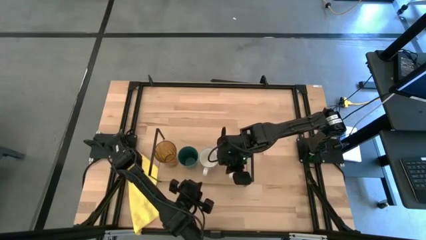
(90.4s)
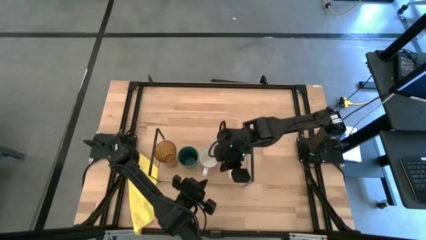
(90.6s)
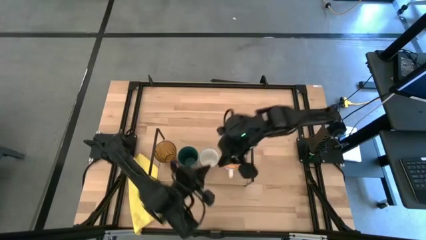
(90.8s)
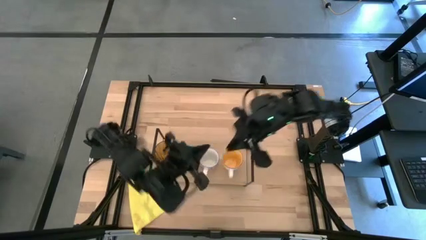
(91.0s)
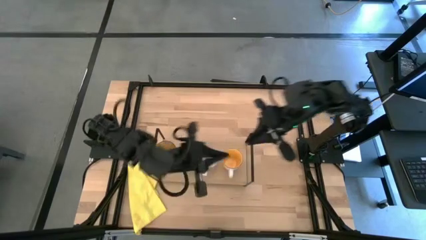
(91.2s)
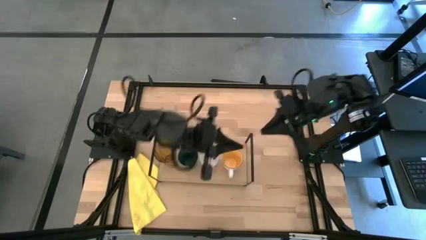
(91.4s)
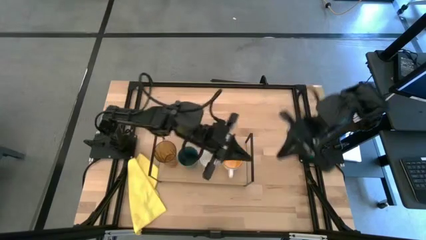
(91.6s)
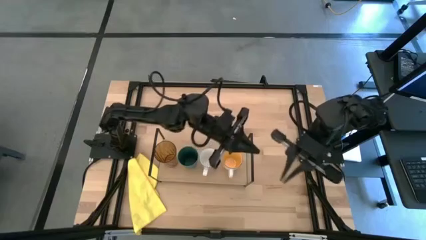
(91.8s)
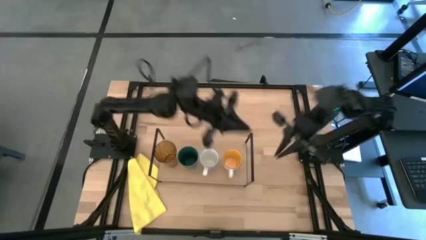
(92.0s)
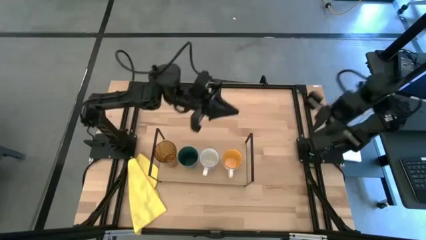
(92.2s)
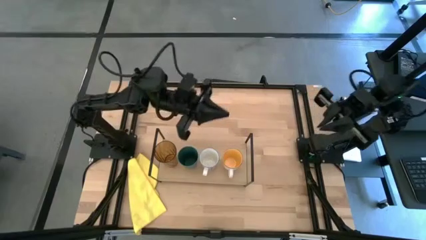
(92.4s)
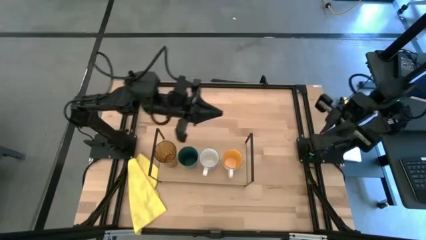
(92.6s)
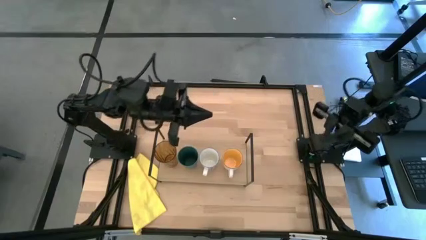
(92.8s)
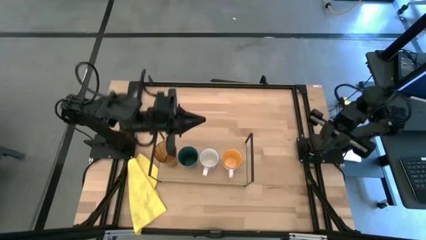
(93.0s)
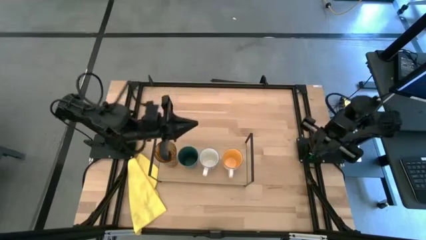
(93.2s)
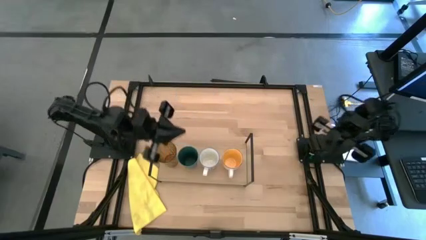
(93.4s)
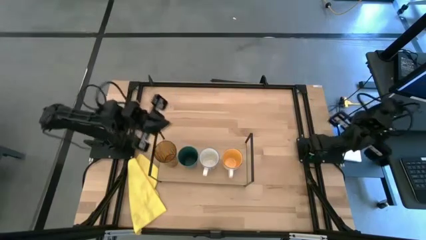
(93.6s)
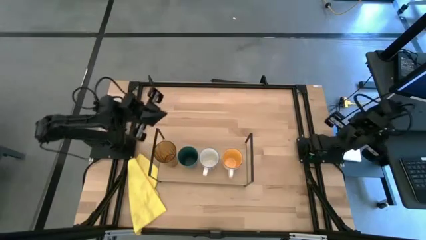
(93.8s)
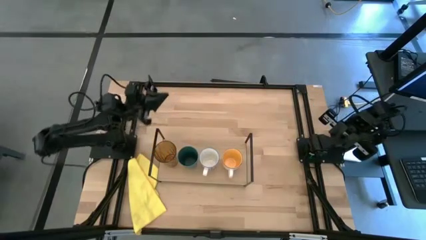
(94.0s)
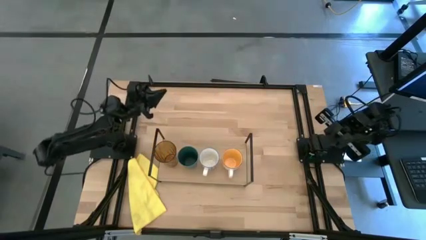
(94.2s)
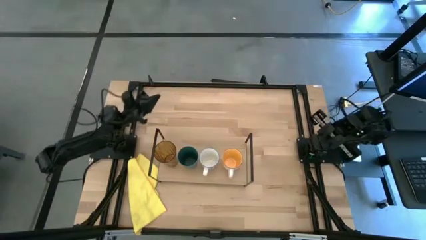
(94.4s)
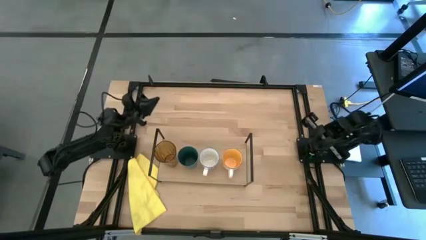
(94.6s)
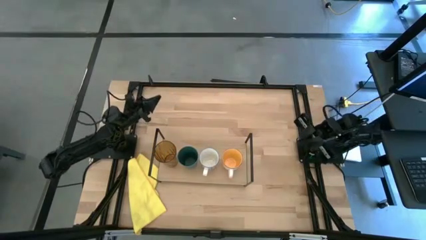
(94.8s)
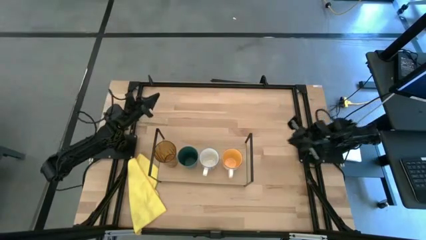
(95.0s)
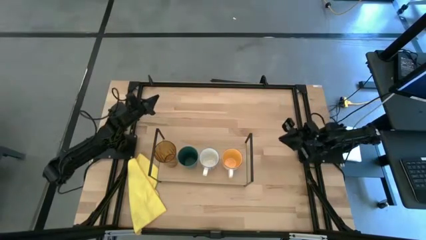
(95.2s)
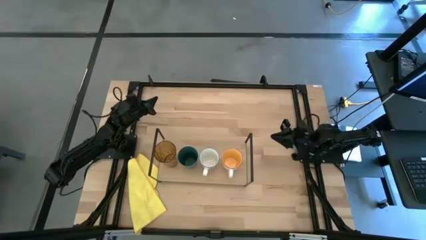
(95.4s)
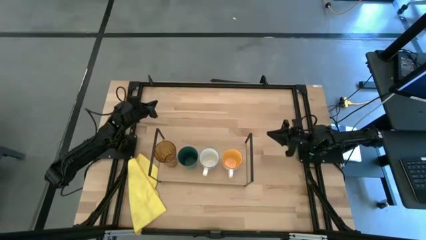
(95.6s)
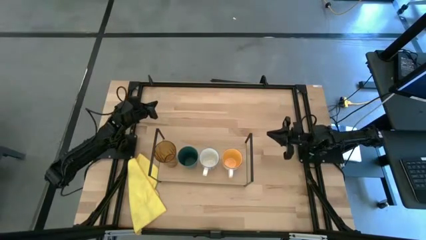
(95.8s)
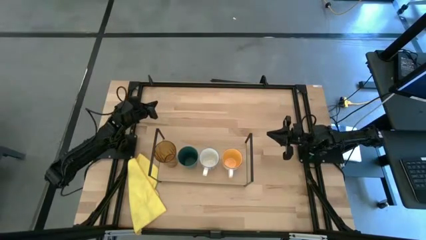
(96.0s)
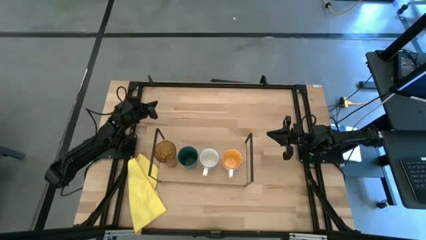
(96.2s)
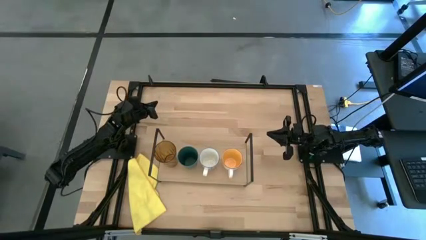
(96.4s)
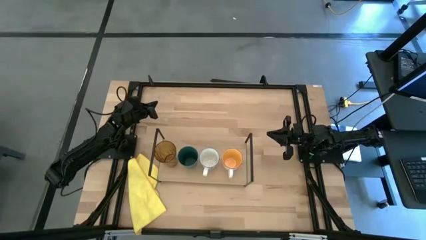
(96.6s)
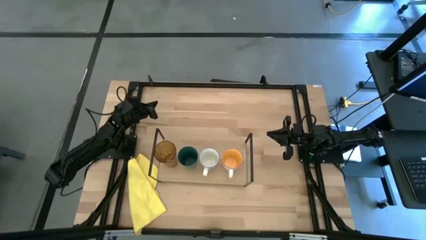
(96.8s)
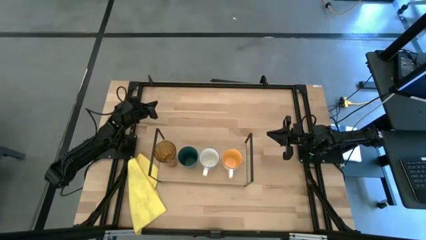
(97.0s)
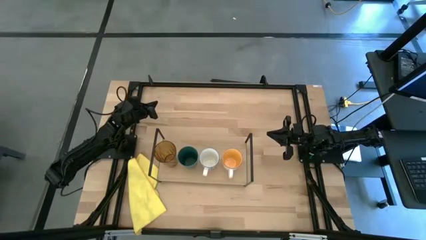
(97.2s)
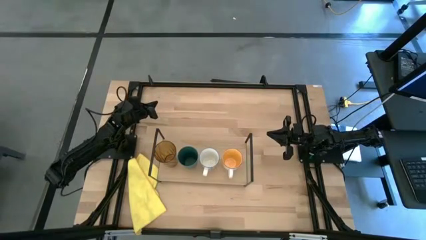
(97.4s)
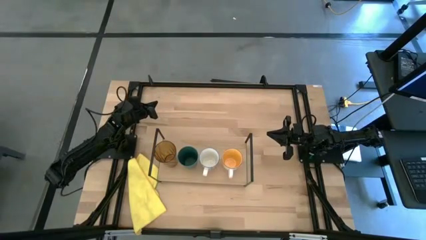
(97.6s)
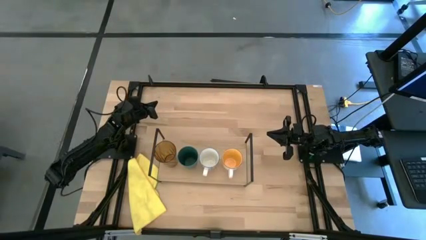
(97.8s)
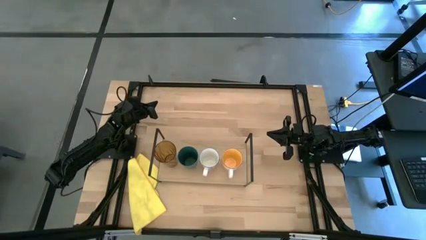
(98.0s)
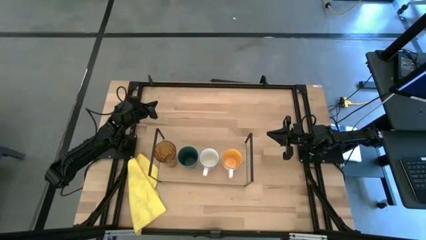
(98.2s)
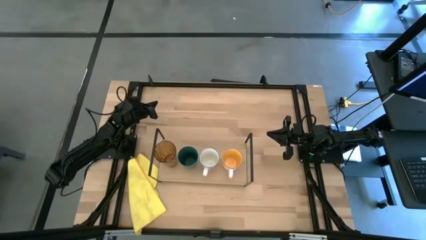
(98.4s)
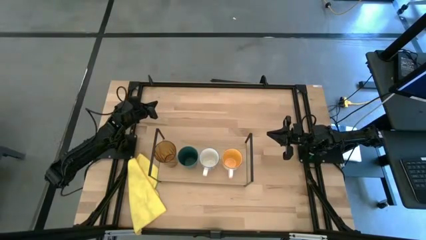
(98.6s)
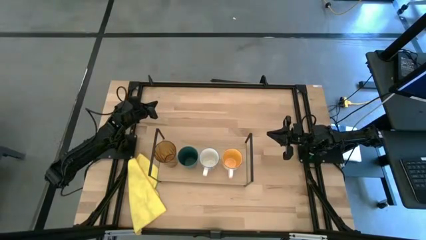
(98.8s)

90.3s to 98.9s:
Task: Stack small to large cups/mugs on shelf
Return to Home Position
